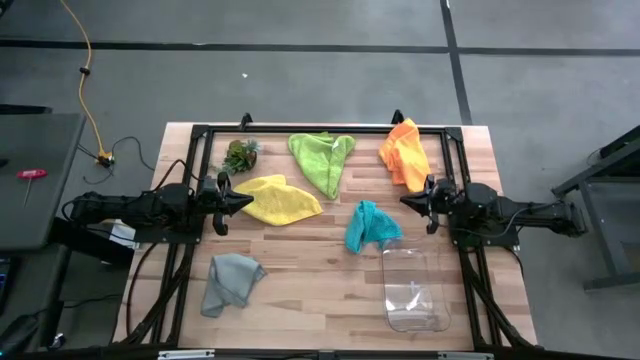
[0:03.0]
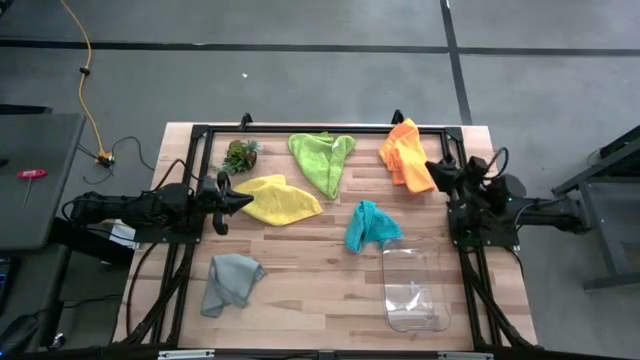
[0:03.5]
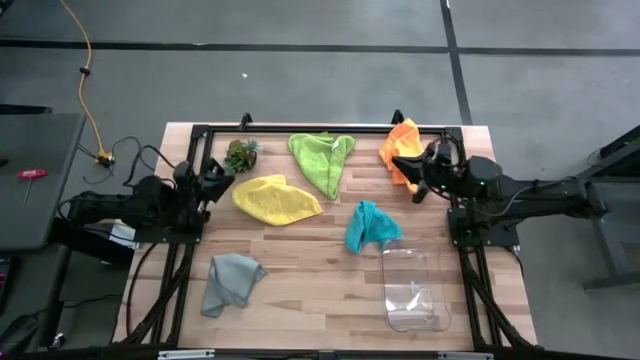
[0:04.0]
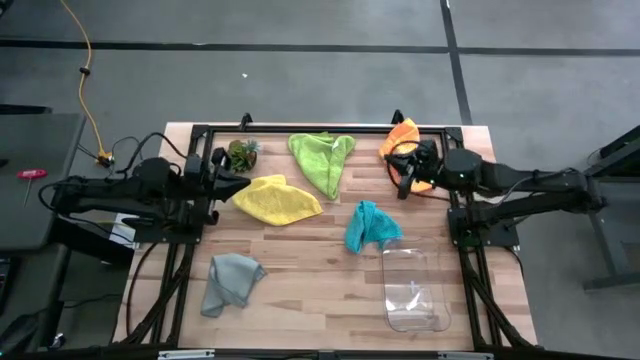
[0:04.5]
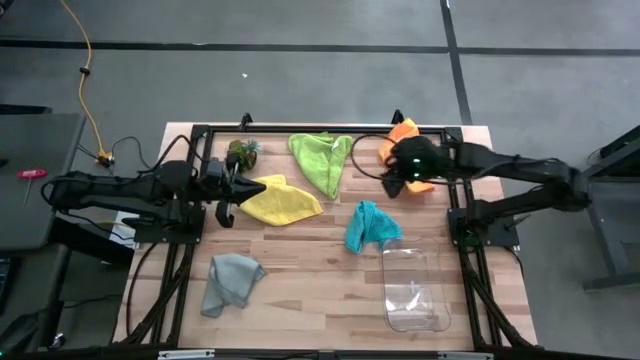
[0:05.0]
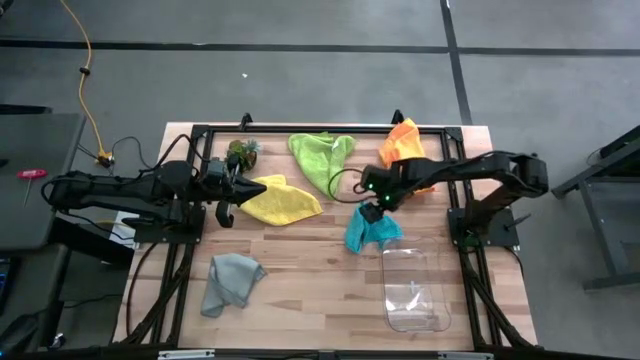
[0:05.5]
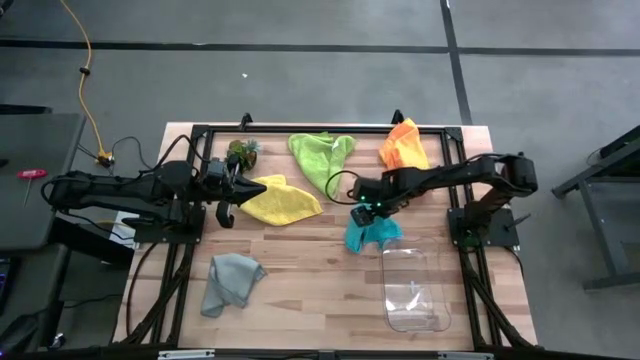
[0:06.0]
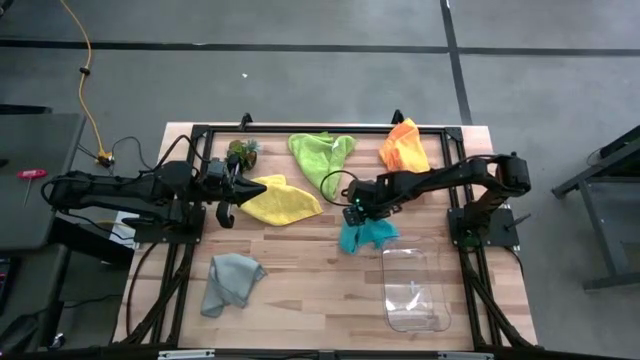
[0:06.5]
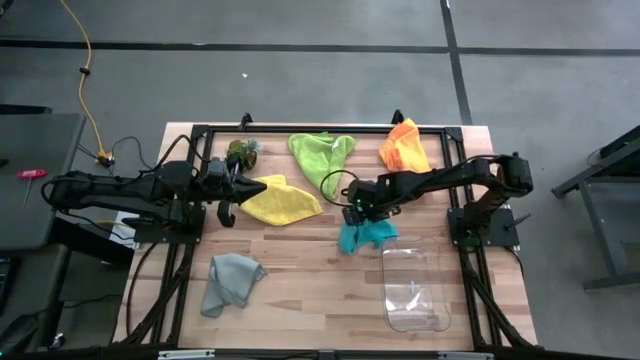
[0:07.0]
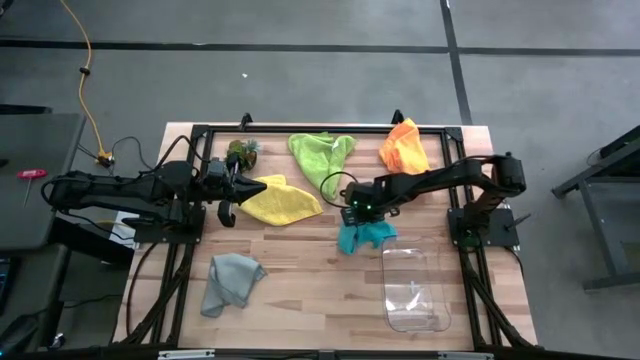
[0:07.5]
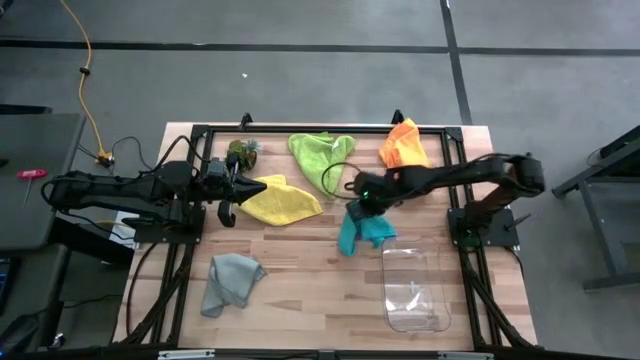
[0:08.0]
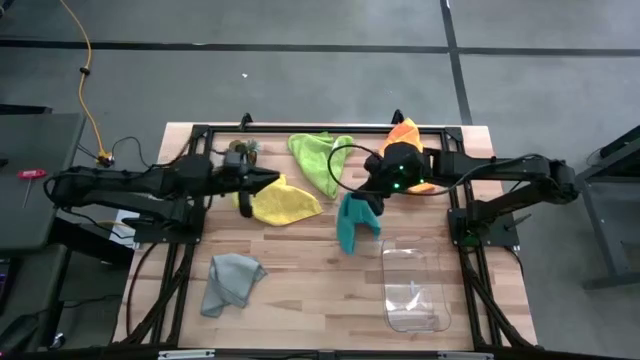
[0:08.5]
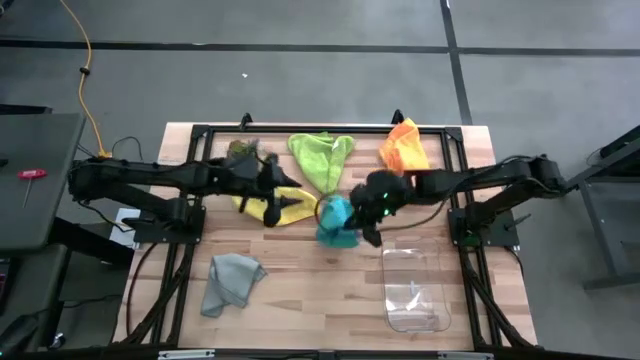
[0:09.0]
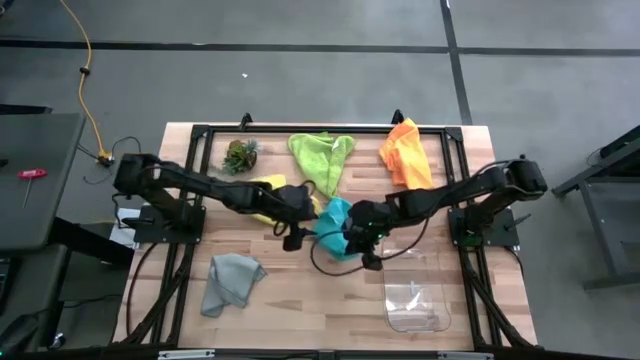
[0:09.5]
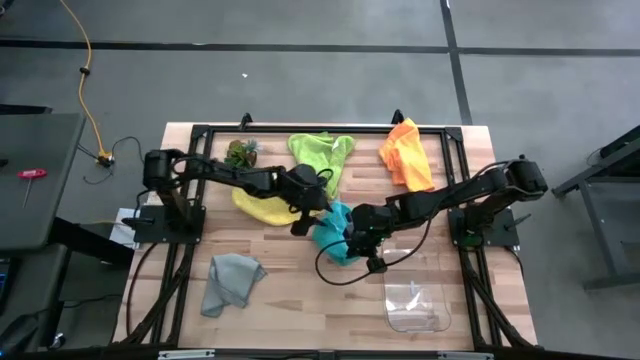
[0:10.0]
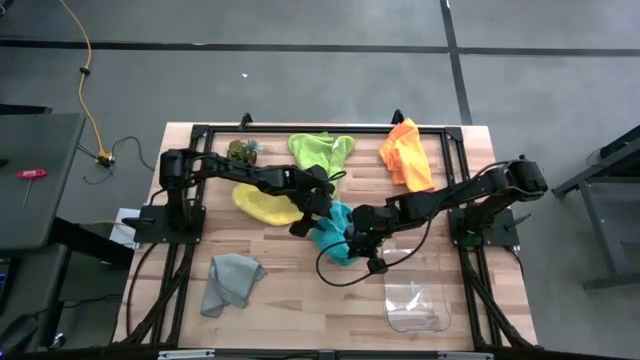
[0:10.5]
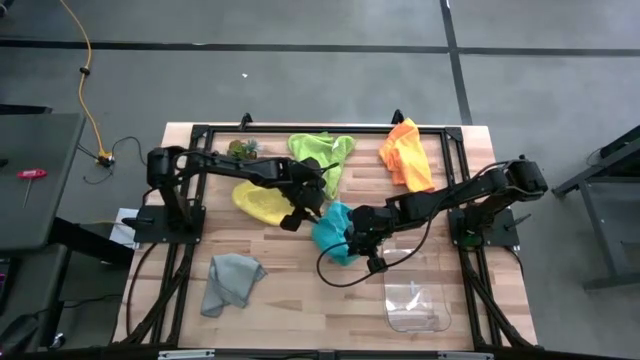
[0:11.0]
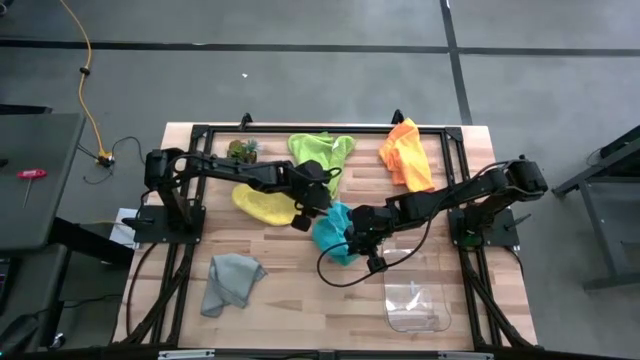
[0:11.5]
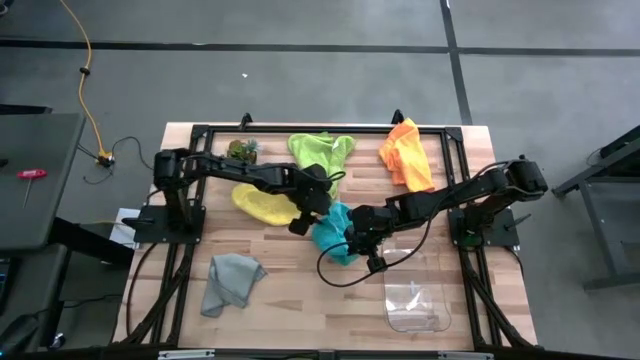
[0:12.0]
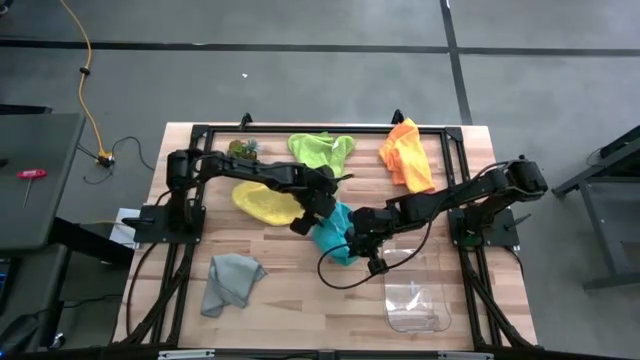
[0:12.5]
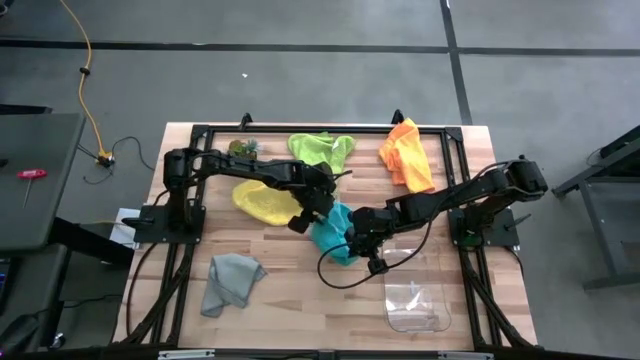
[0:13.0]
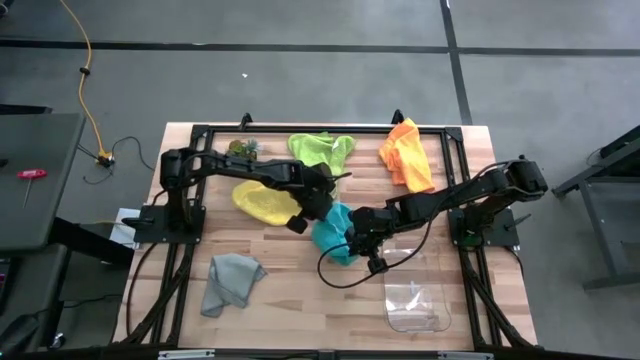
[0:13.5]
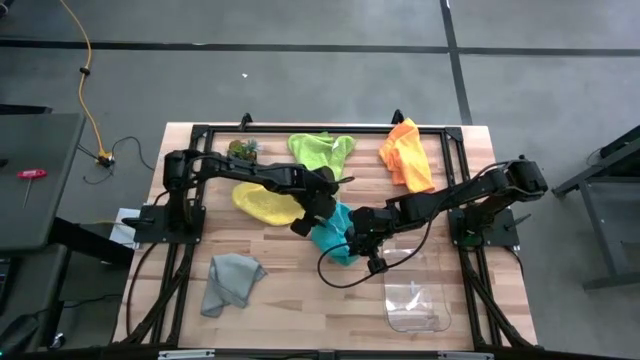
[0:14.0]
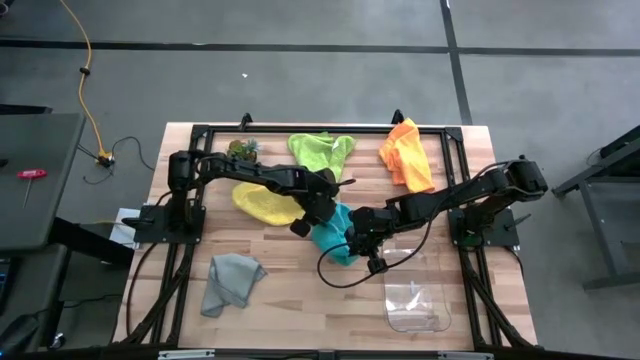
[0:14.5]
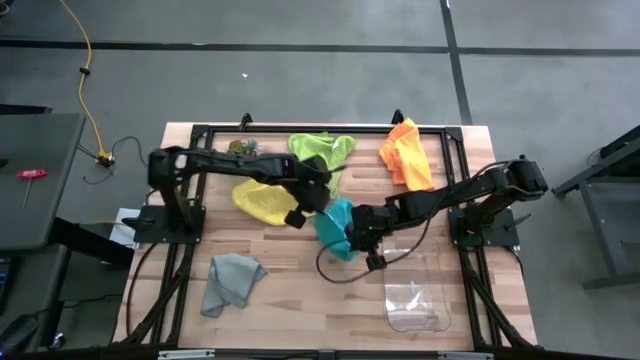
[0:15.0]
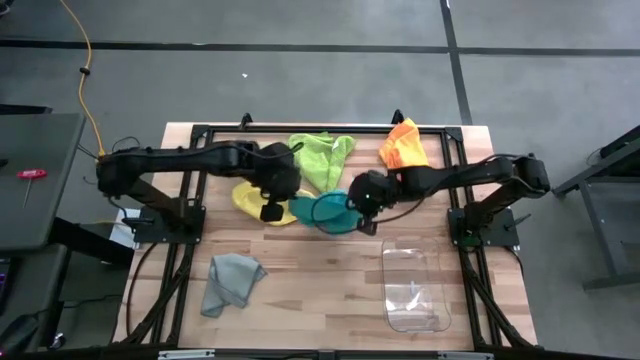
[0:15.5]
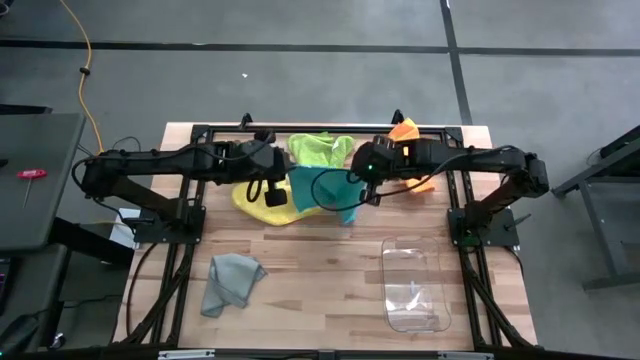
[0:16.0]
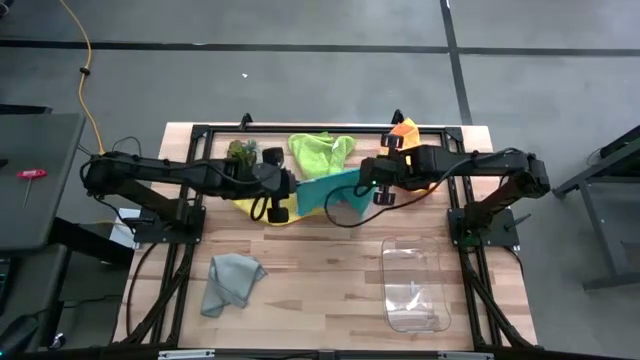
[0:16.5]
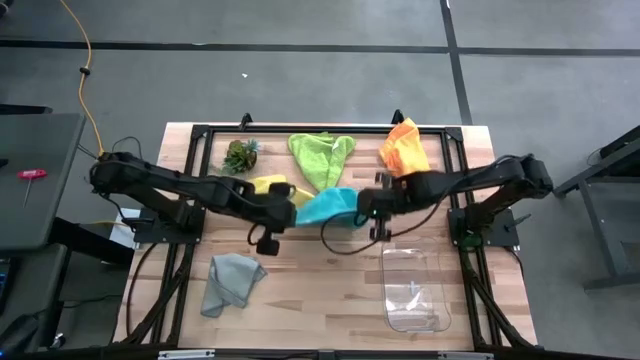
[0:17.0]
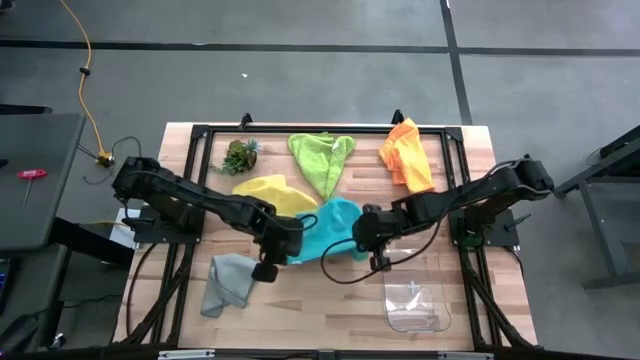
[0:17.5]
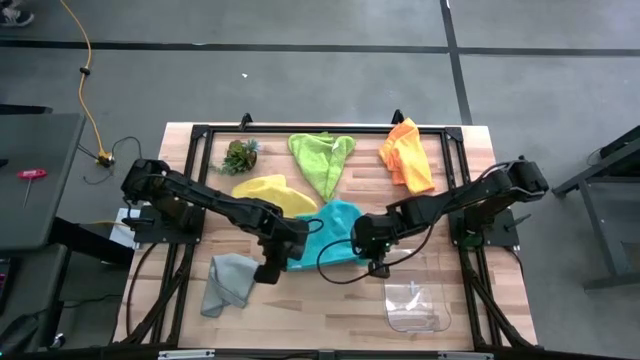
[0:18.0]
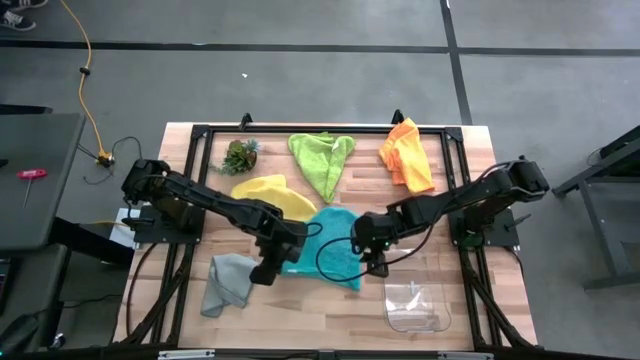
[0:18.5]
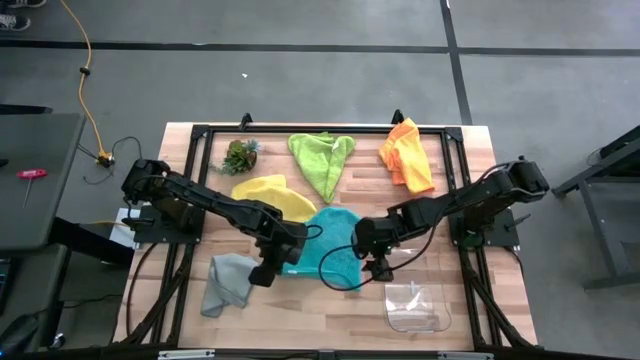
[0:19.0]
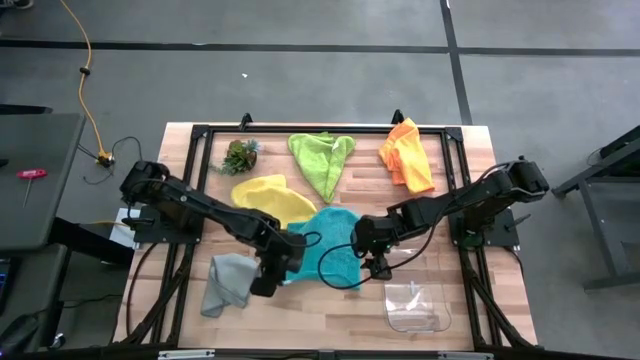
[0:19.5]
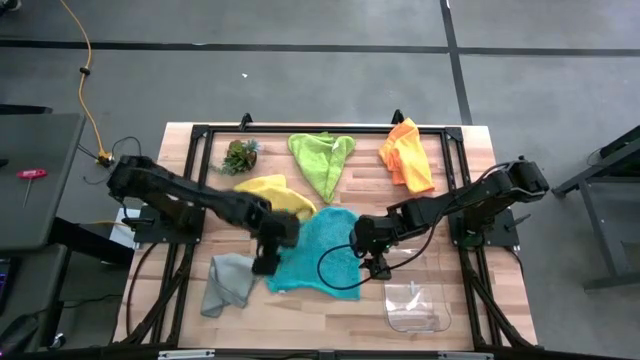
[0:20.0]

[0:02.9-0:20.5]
Task: Fold microfiber towels
Fold the blue microfiber cloth

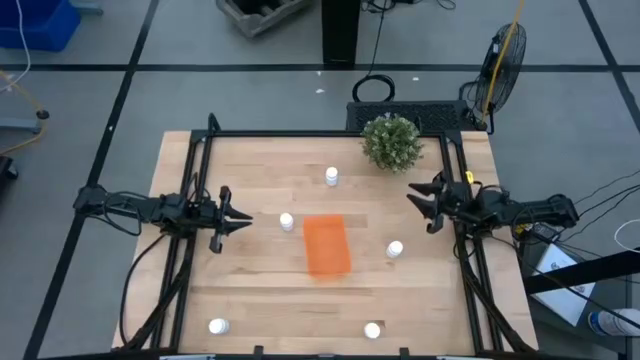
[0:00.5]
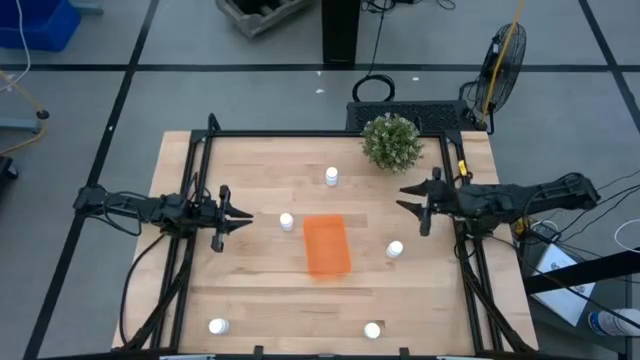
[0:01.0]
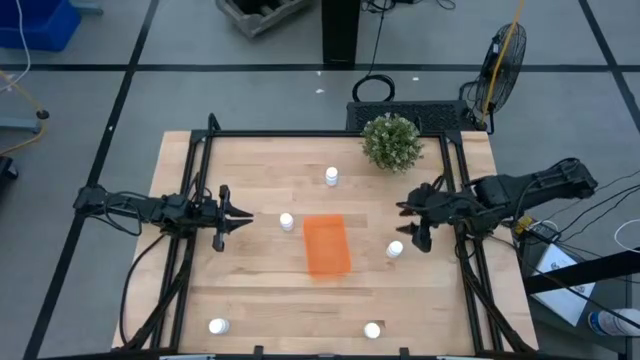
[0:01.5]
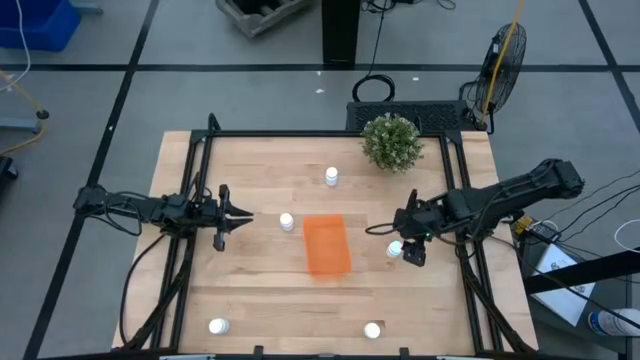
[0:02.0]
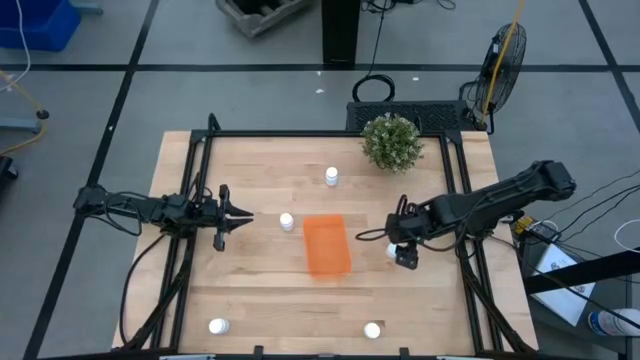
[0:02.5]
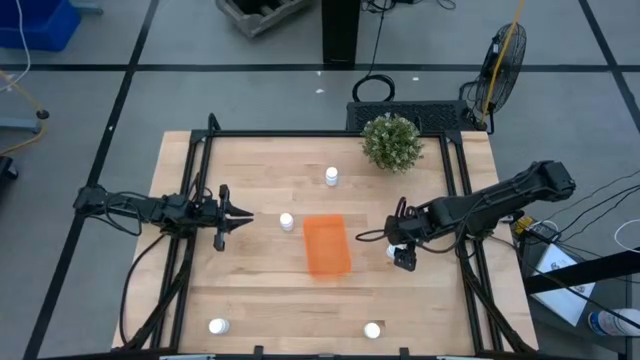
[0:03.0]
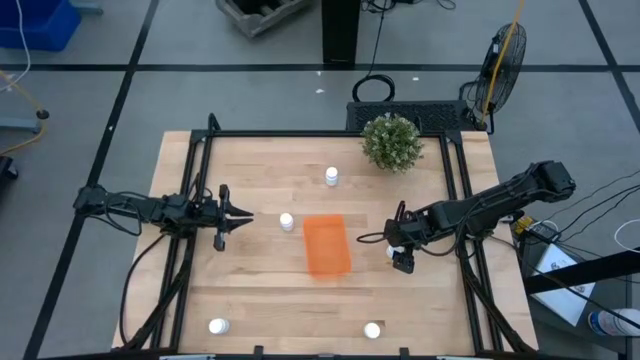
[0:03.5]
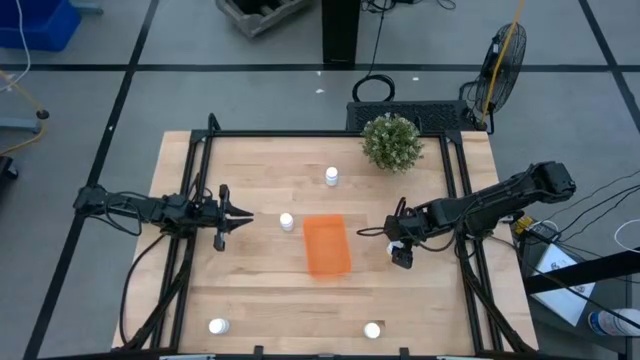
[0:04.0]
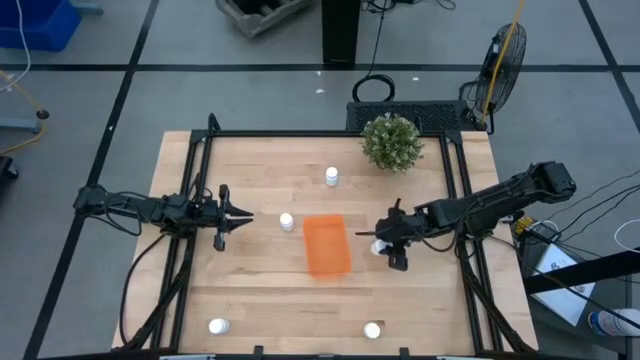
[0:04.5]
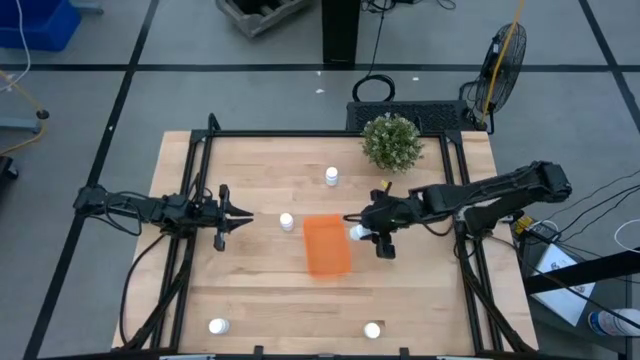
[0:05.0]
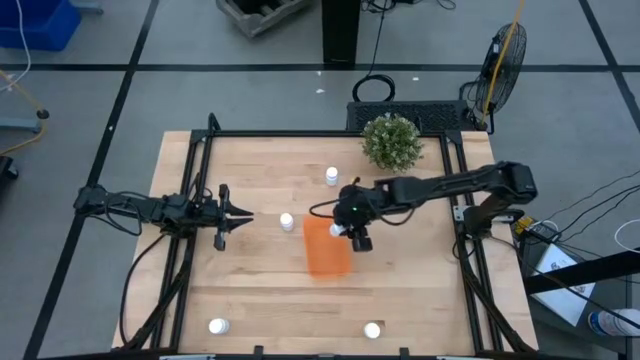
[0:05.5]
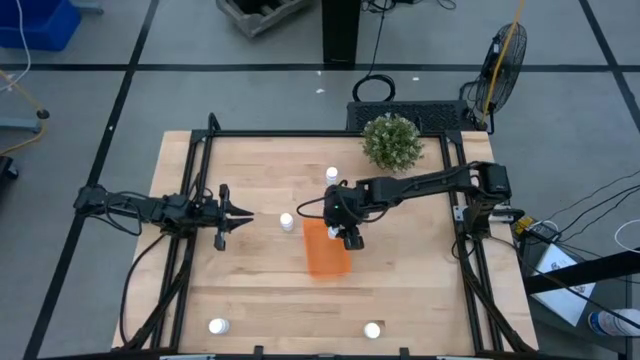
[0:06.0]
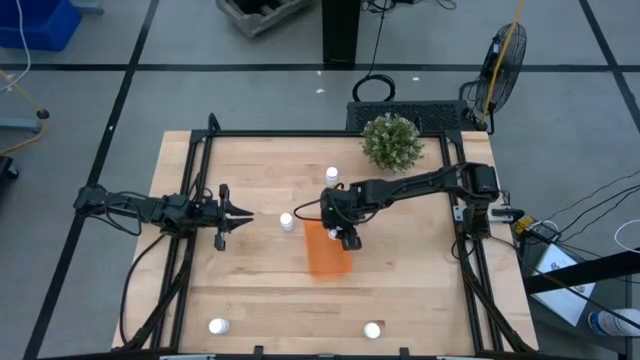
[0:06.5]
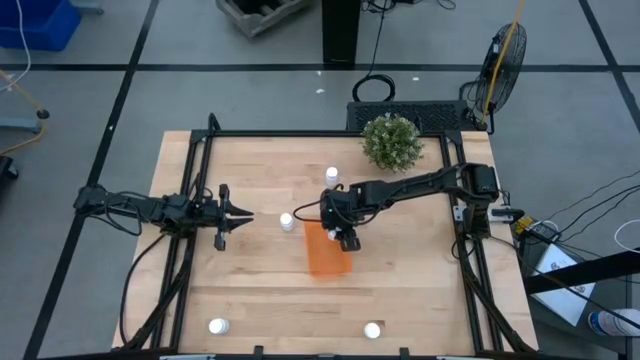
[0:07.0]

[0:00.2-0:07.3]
Task: Pick and place pill bottles into a basket
Put the white pill bottle into the orange container
